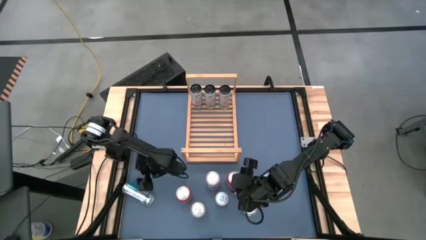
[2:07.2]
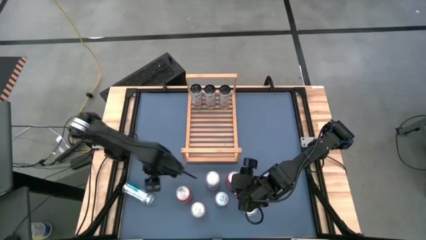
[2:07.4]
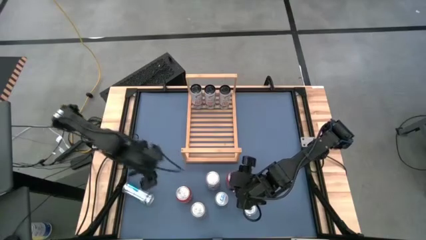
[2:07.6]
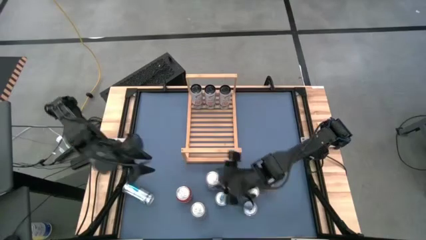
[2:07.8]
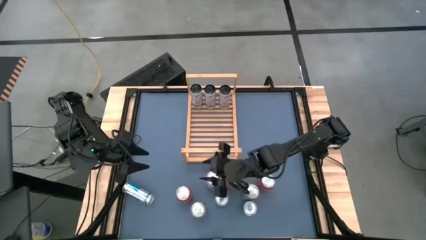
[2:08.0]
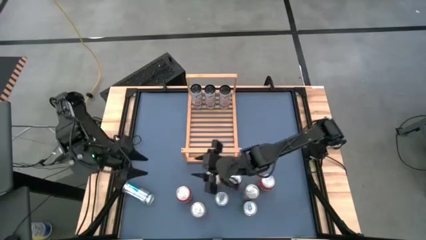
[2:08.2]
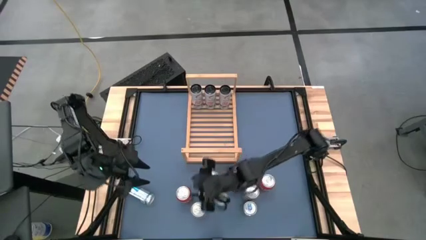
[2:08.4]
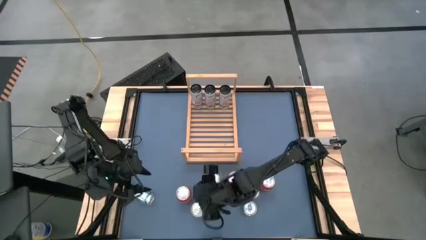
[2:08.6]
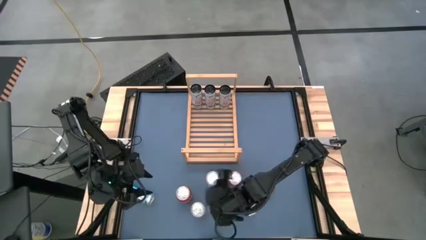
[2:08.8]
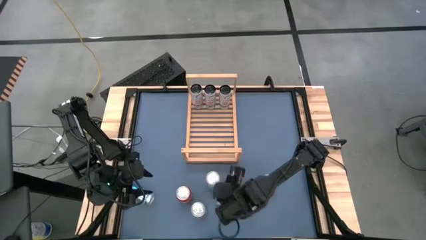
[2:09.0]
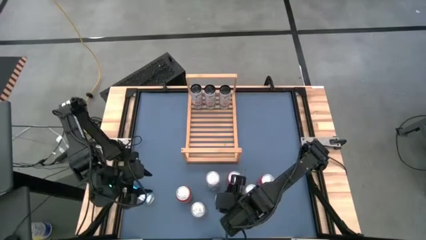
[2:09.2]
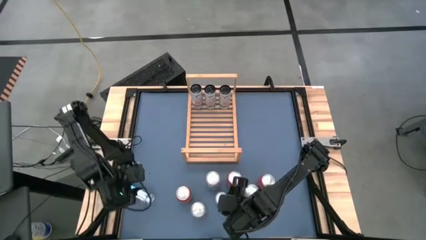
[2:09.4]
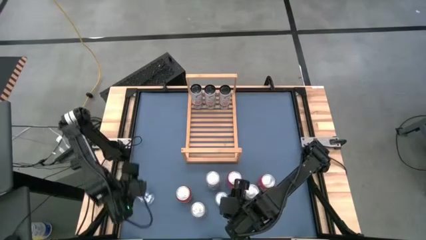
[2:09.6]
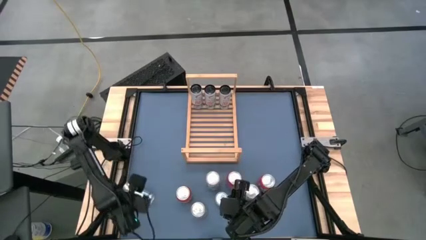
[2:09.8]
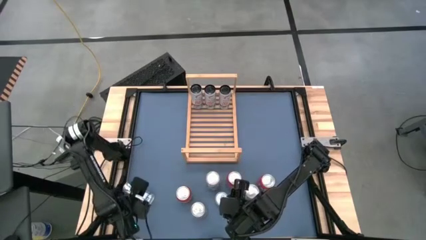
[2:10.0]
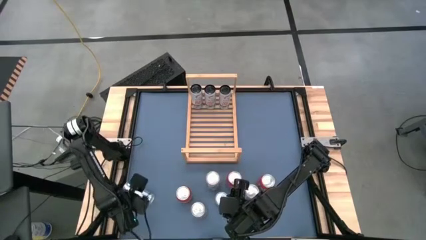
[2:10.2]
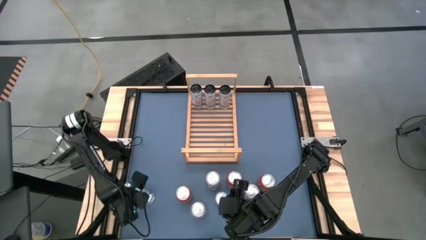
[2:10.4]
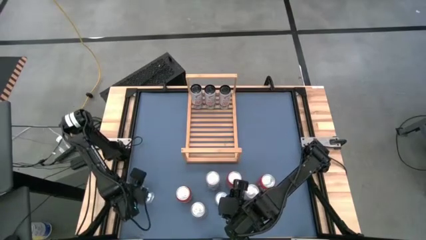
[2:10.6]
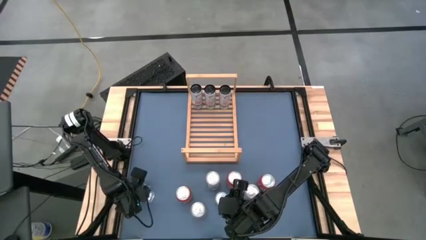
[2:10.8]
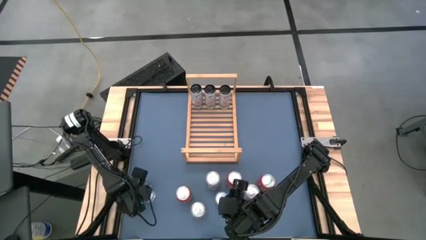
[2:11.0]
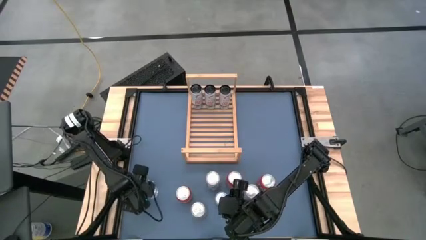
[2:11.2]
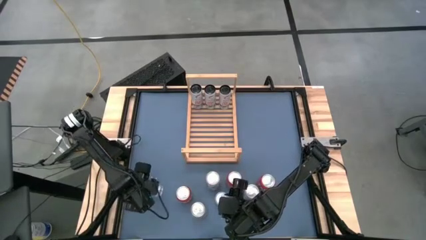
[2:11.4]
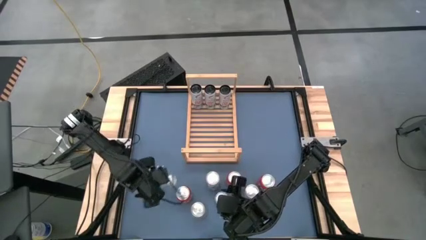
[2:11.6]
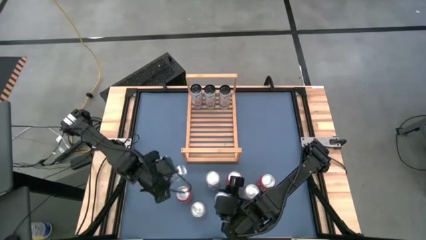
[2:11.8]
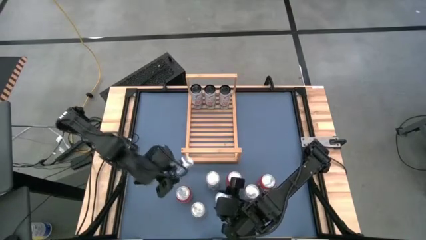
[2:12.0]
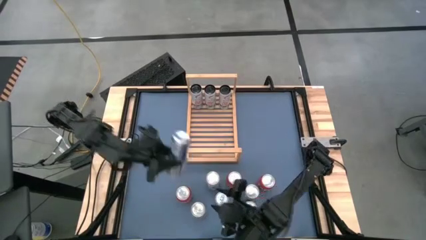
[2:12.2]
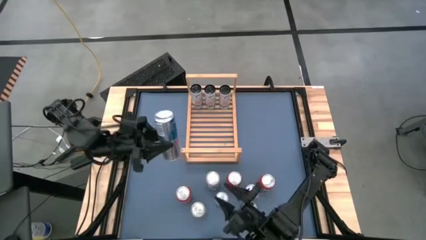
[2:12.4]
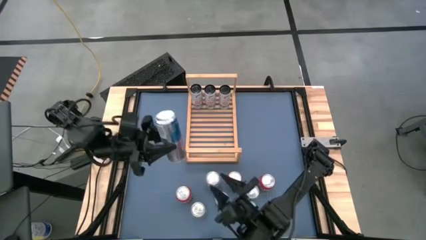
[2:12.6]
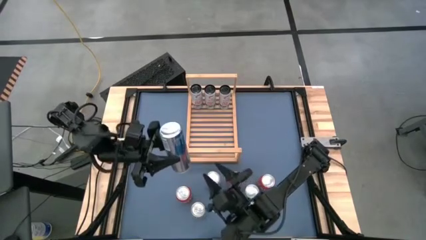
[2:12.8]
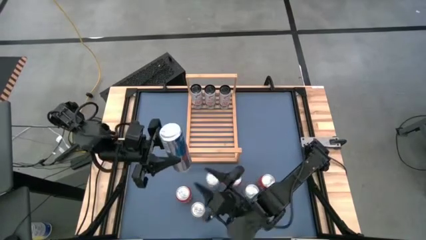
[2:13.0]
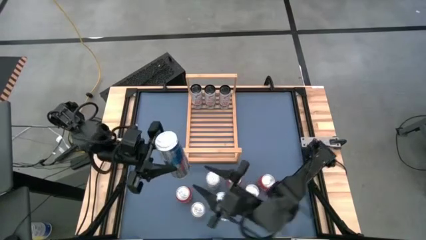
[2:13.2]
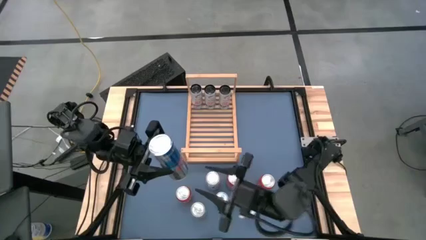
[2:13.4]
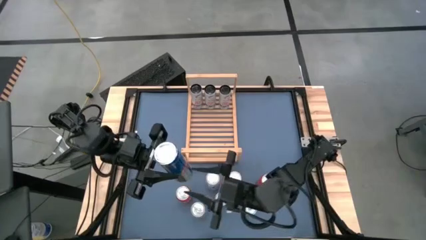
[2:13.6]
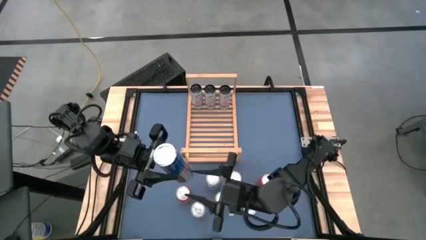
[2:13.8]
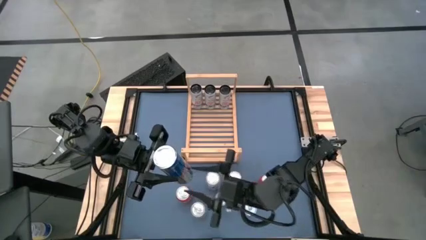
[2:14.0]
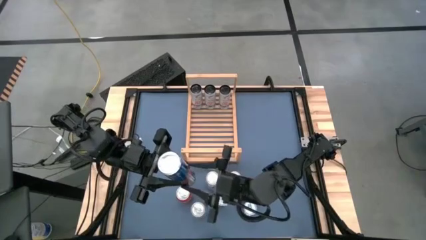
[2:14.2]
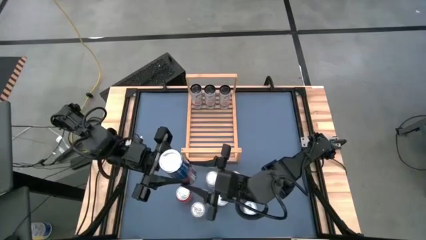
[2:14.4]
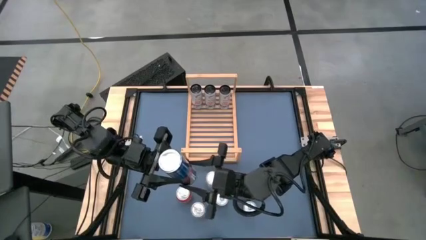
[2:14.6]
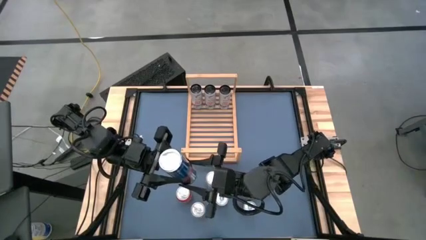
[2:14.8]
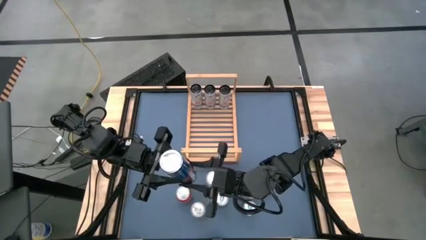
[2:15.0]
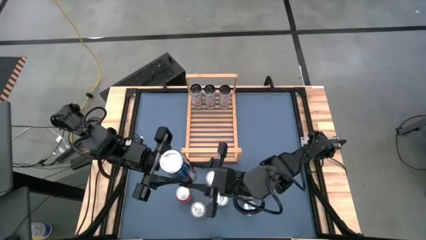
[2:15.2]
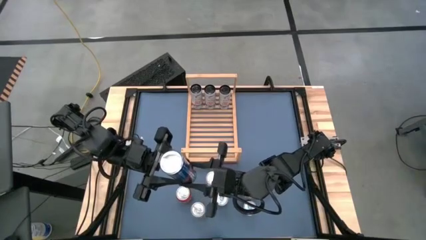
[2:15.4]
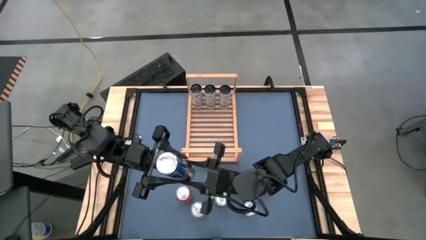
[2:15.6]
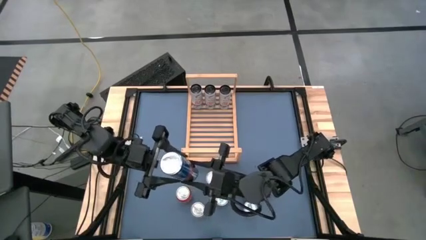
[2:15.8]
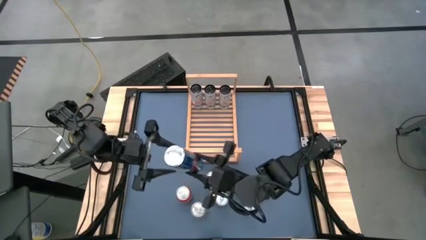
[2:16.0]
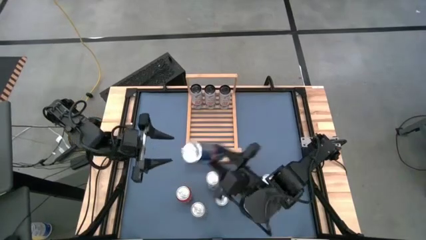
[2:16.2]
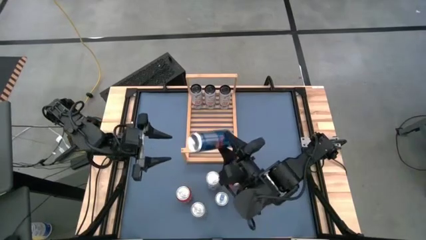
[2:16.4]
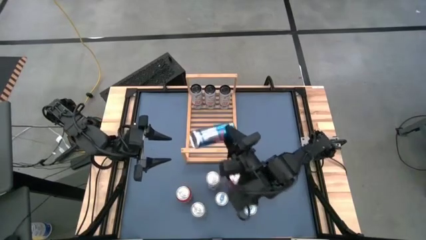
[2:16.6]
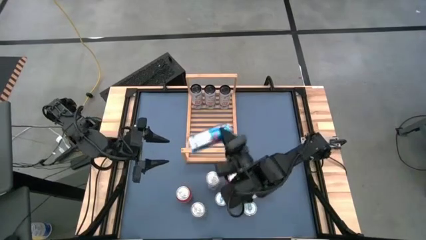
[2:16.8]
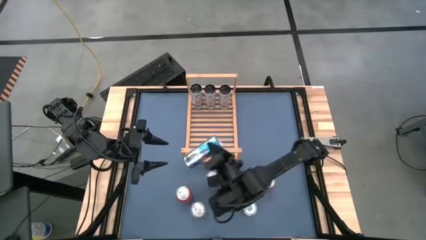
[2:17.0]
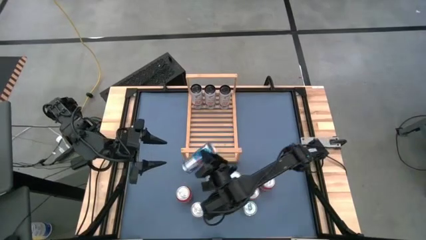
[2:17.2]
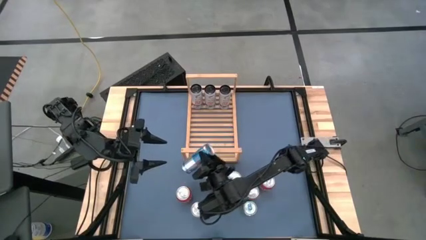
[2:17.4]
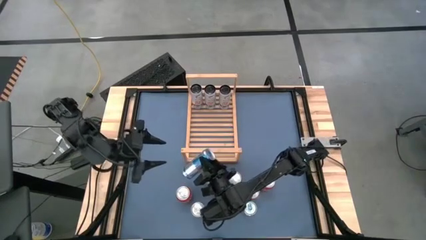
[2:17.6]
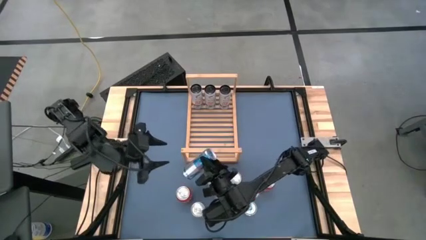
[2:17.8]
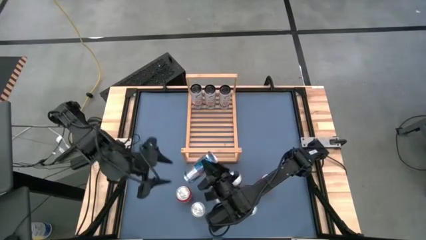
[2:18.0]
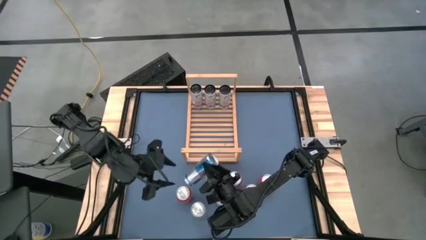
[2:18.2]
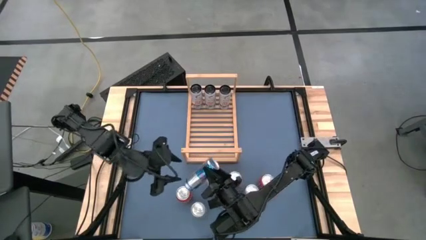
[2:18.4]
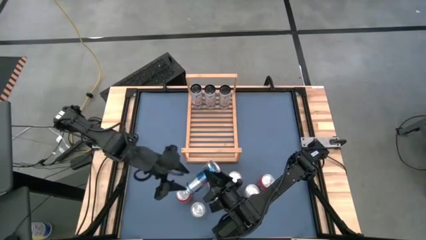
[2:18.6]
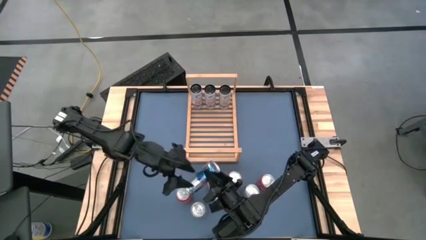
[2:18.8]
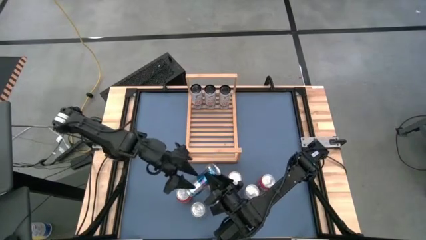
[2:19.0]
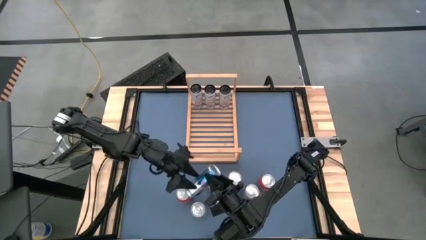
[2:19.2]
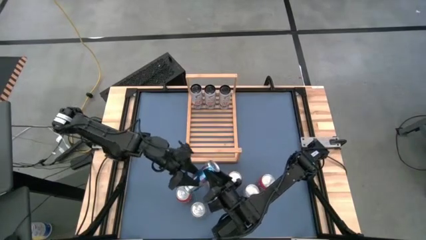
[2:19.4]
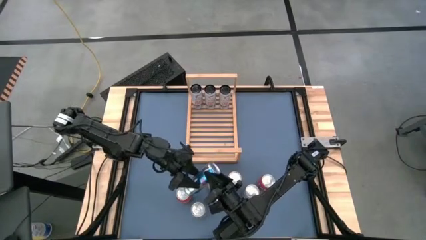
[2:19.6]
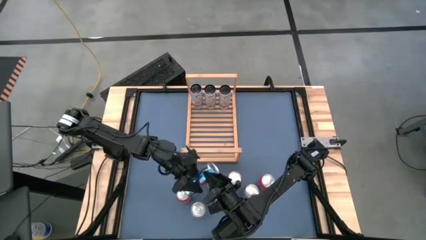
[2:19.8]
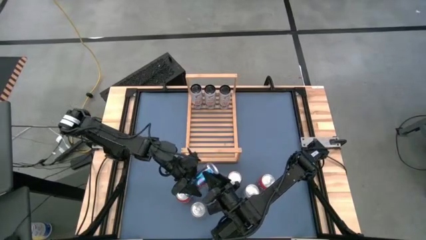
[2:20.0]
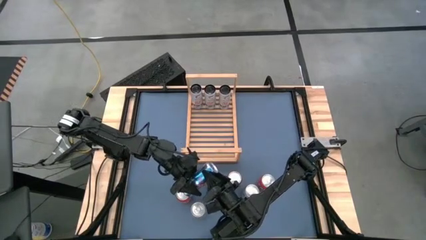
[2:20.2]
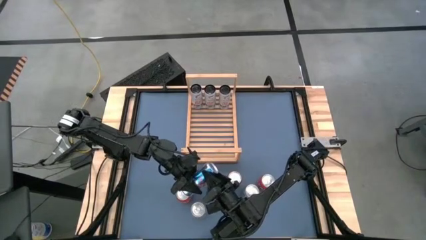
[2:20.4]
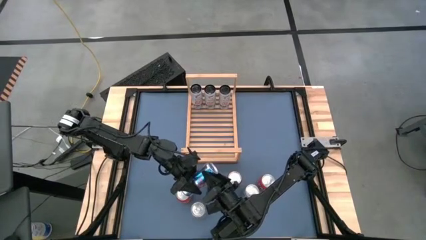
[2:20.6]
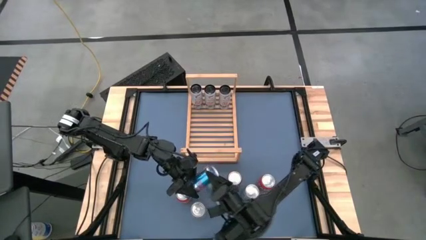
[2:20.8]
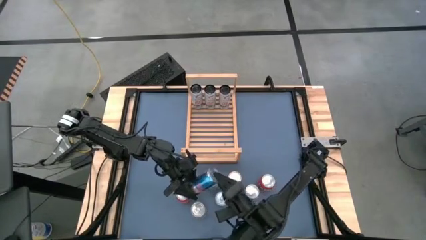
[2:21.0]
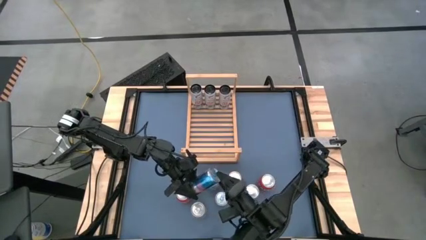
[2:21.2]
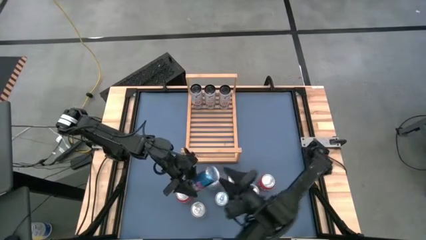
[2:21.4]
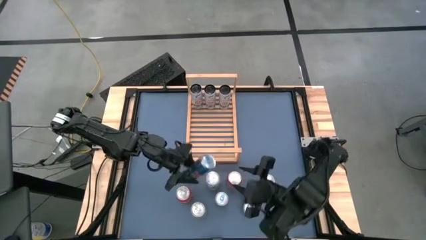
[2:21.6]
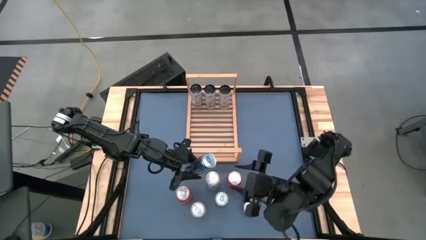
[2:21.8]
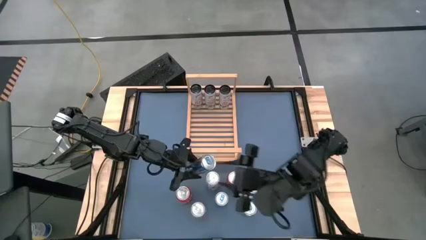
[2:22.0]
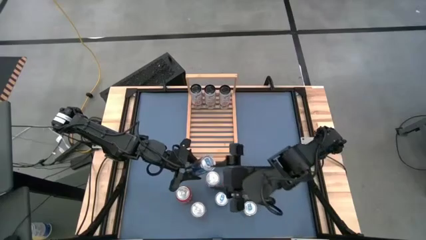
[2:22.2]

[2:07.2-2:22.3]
Task: Place canned beverage on shelf
Put the top blue soda can on the shelf
